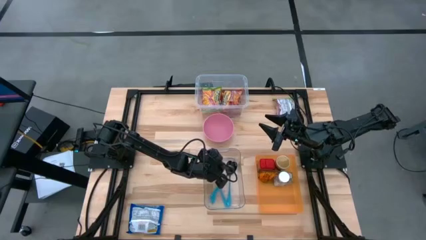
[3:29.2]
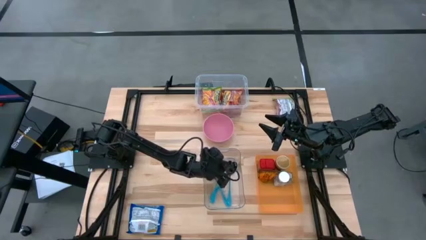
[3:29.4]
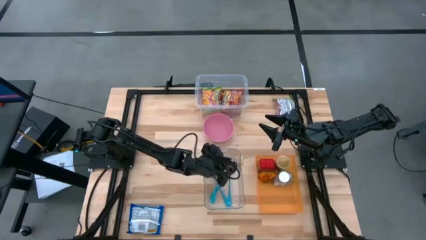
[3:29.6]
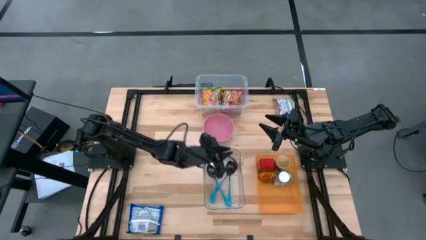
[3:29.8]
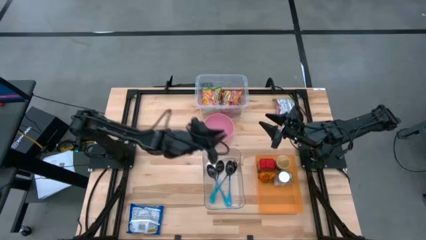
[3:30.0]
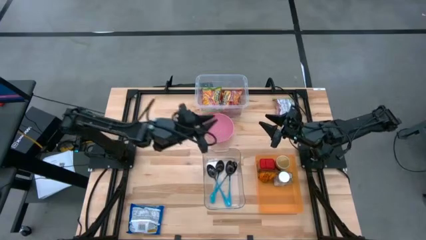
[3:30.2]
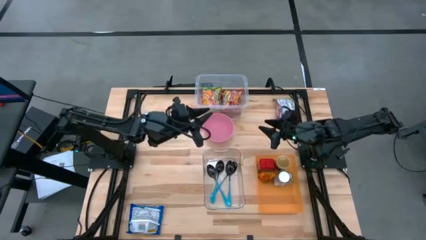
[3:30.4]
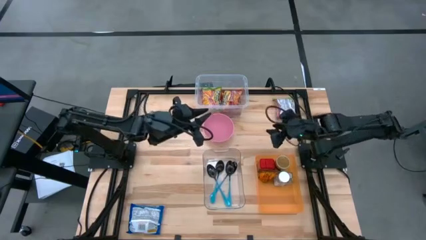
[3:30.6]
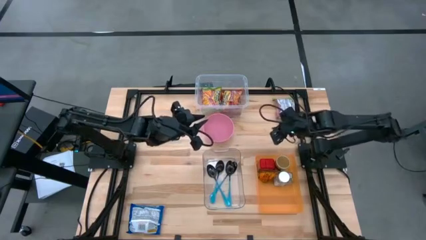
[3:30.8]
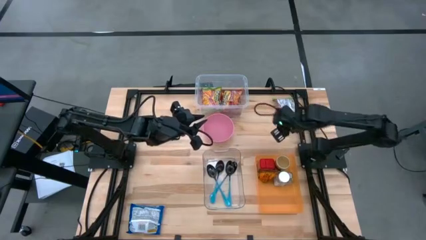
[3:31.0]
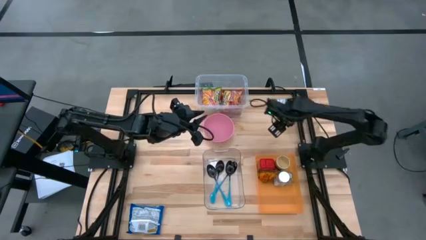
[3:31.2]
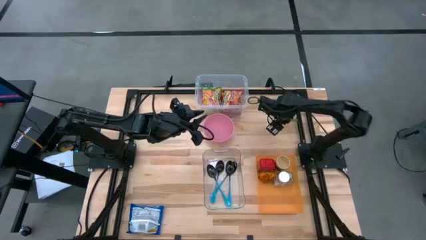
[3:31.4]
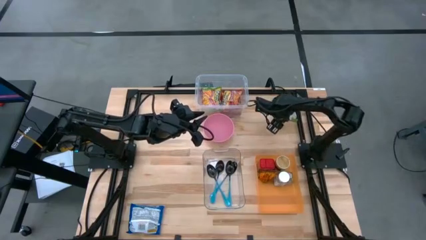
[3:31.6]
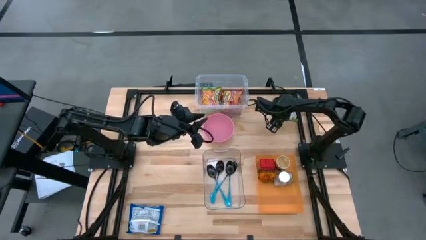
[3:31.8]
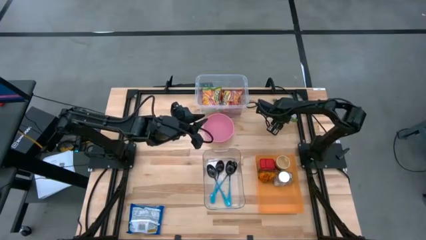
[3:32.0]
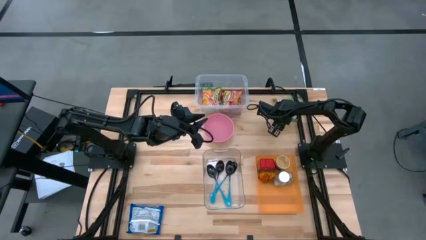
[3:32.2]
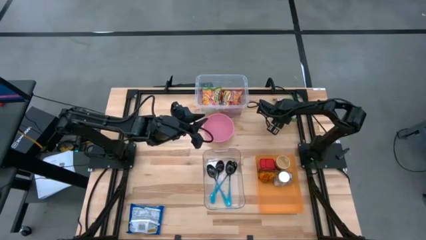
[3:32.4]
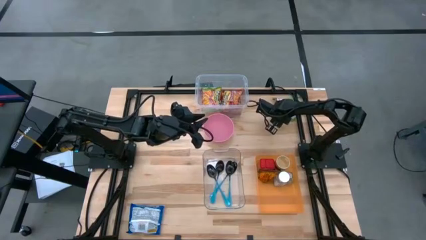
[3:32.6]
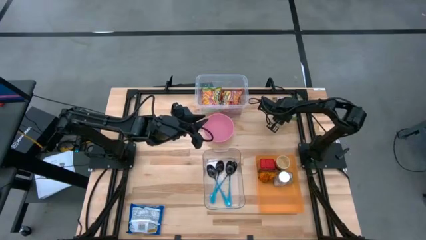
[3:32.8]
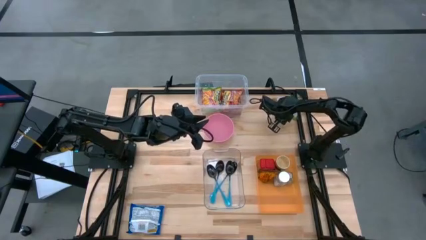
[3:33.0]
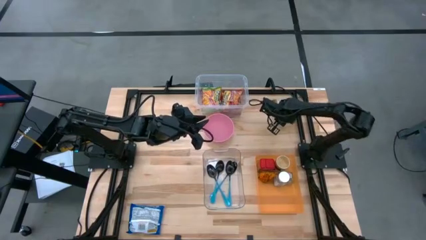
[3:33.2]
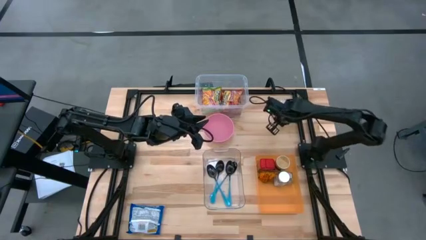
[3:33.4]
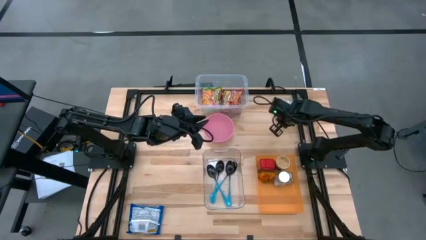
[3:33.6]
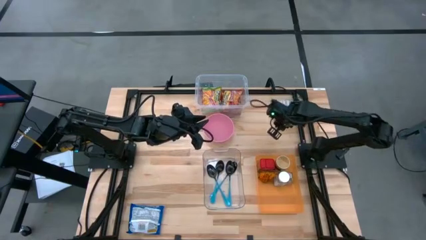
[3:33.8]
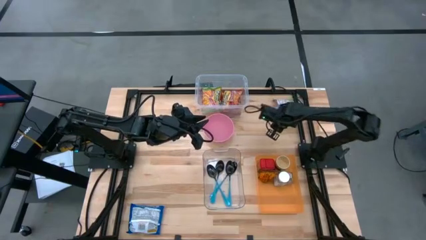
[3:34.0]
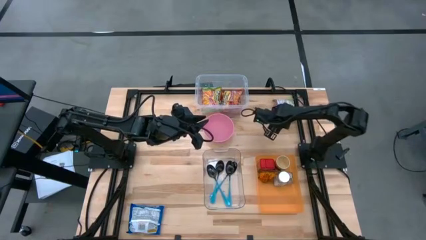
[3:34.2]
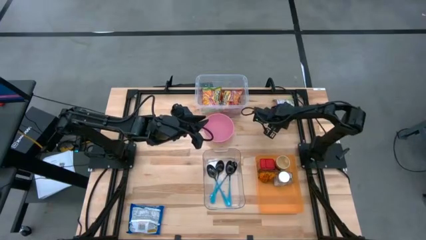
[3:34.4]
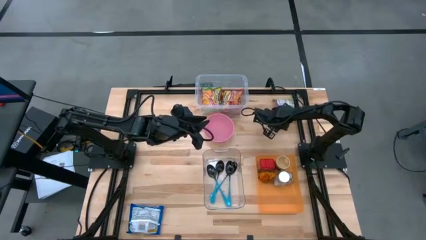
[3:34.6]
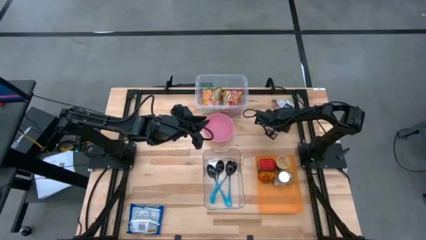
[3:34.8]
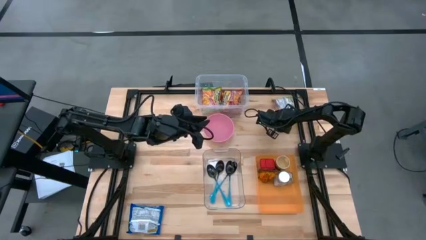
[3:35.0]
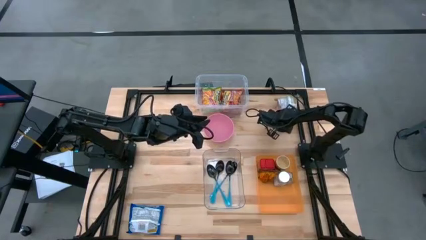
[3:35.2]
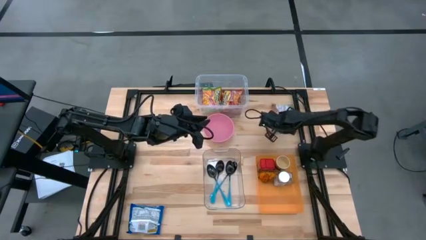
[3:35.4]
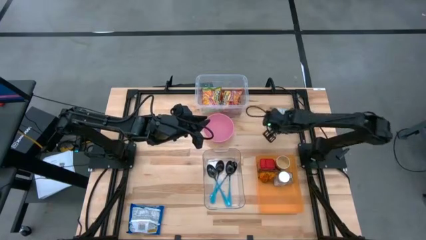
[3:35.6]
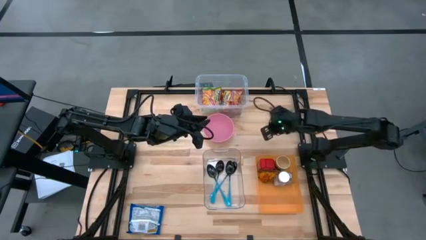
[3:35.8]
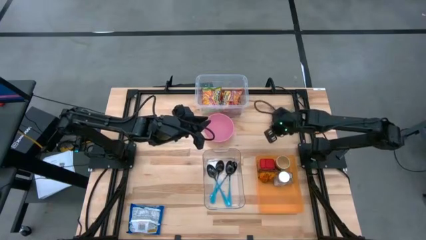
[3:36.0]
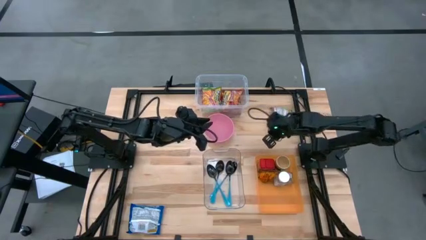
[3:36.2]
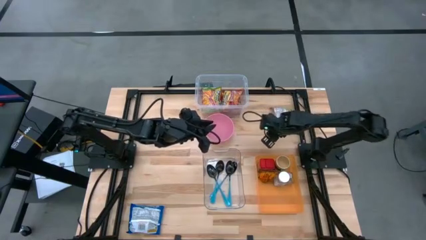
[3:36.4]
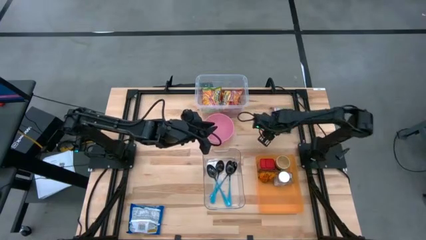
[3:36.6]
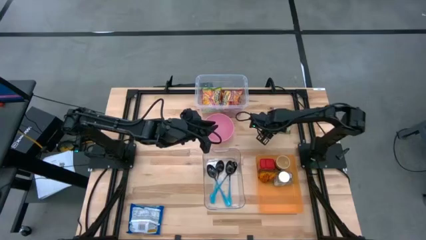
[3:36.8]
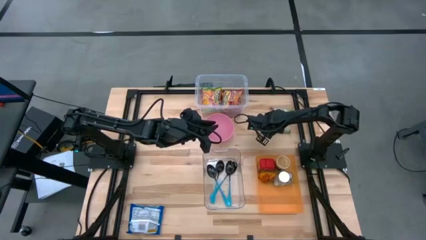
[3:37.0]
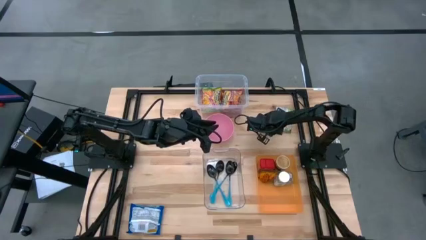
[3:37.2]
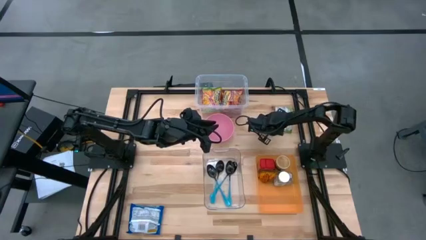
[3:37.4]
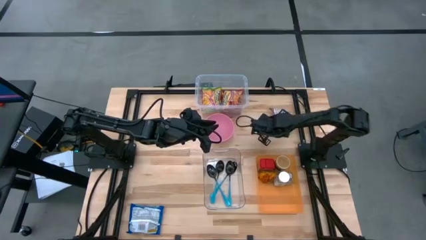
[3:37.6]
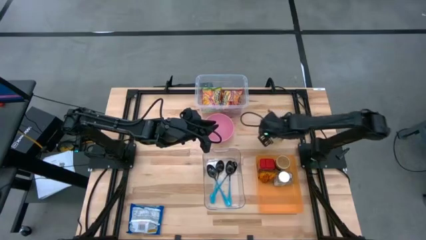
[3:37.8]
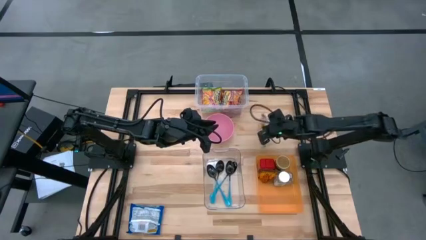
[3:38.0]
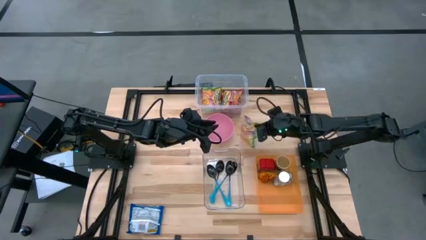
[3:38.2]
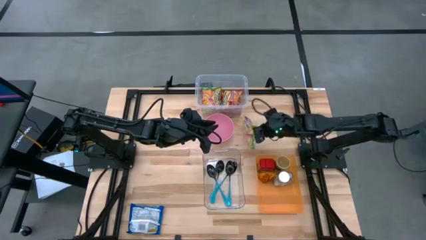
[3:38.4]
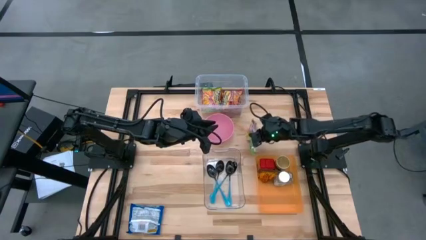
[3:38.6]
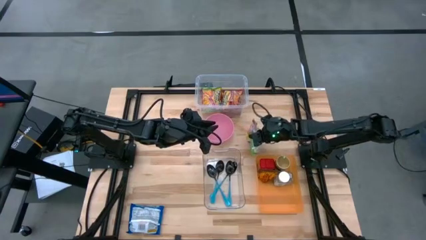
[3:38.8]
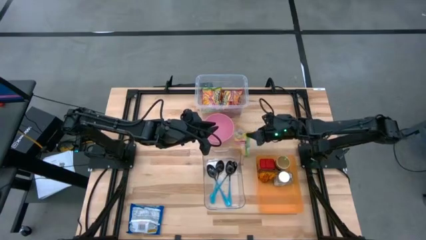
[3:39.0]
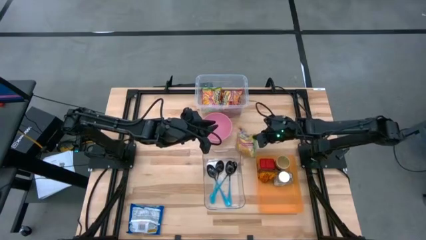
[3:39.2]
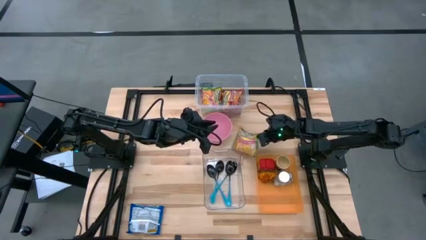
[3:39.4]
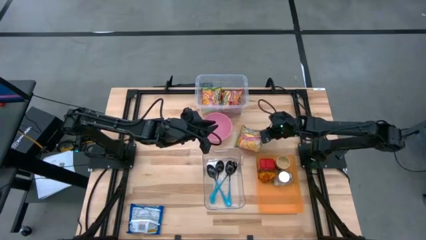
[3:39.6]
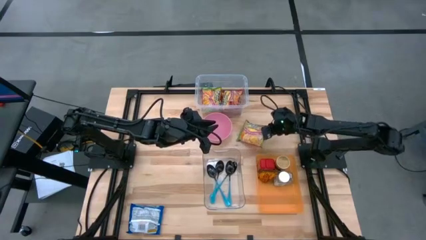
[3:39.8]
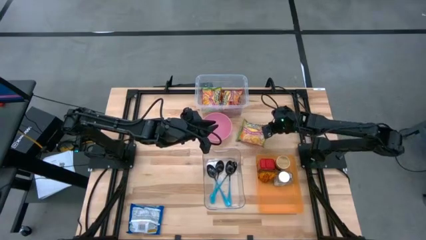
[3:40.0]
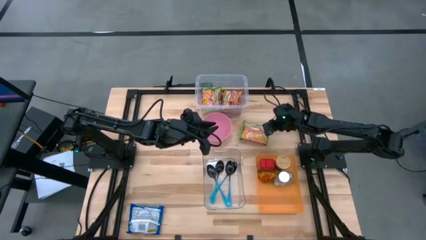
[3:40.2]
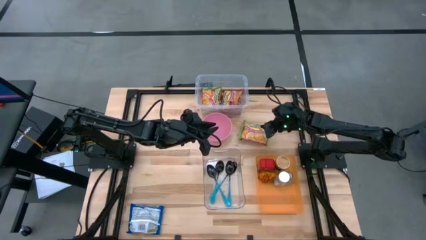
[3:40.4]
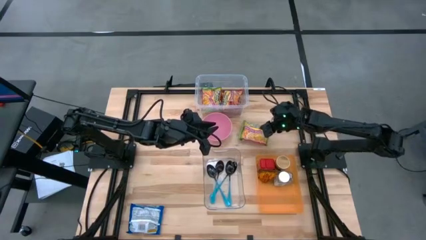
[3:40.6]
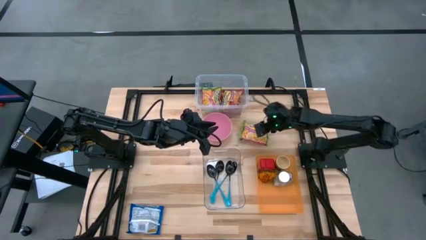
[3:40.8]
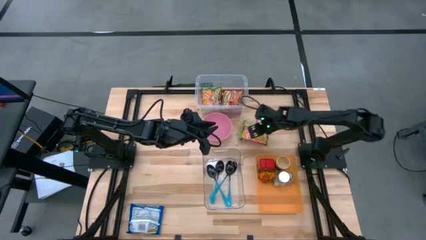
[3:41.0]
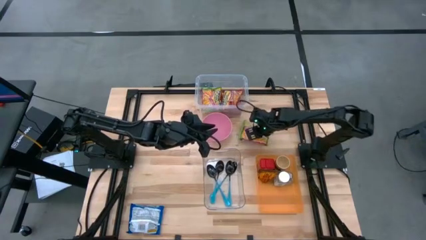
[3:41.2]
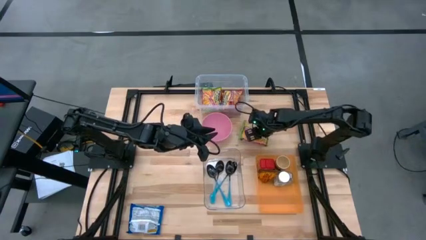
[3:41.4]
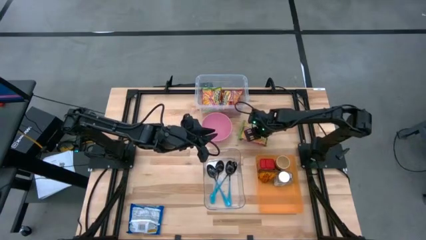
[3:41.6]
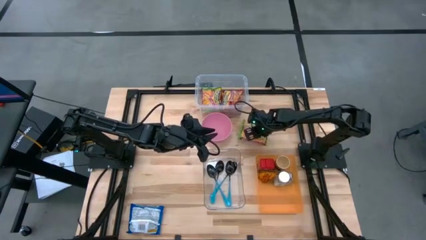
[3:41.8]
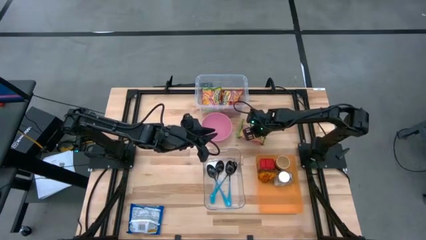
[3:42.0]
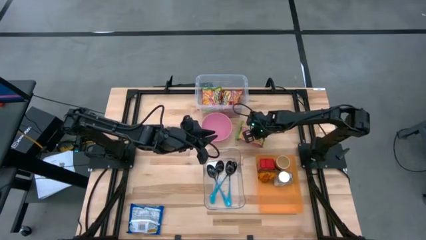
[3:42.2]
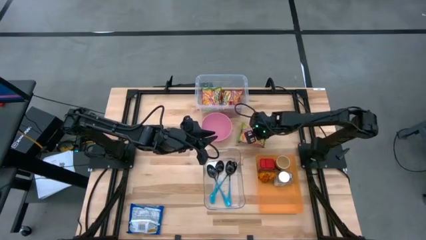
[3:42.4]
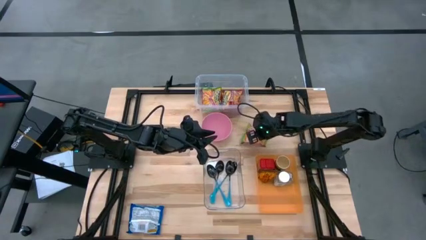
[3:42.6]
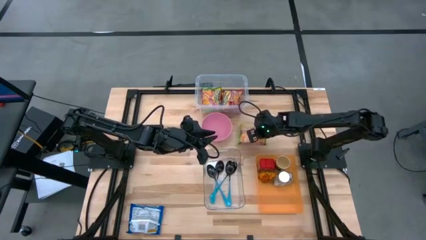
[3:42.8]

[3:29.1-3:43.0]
Task: Pick & Place Food Item
Put the green noodle pack into the top transparent bin

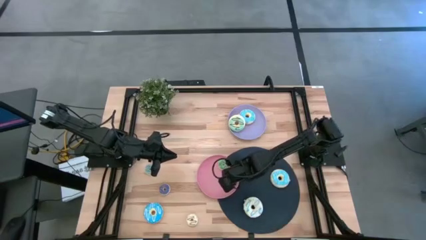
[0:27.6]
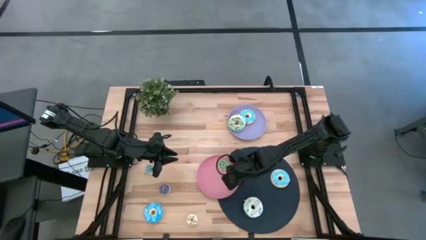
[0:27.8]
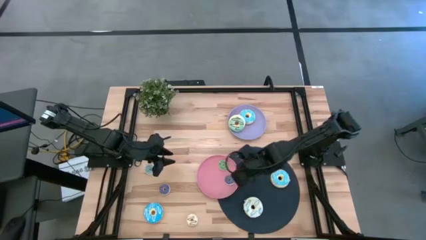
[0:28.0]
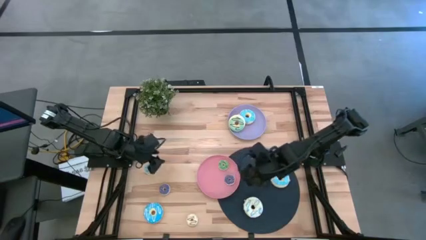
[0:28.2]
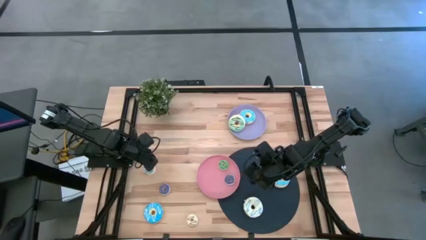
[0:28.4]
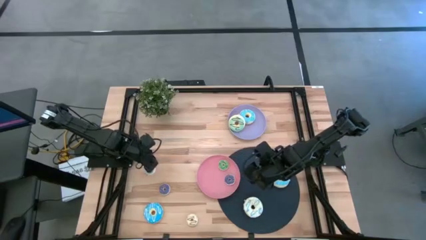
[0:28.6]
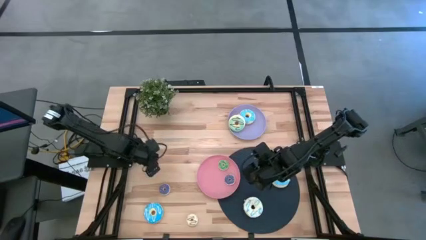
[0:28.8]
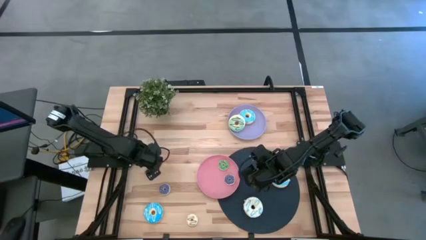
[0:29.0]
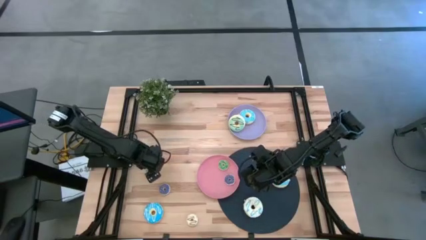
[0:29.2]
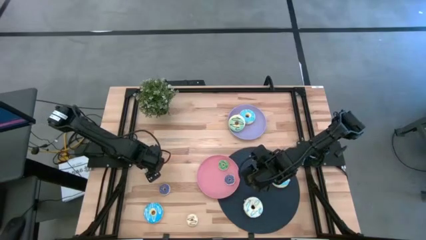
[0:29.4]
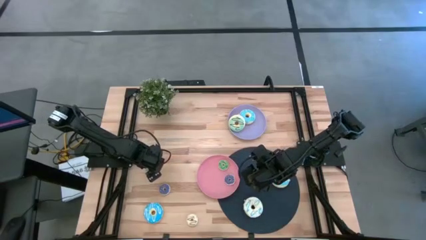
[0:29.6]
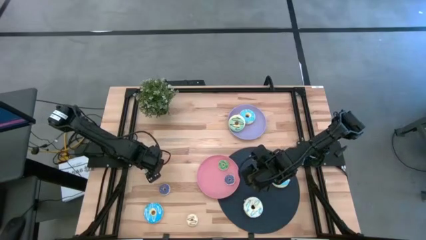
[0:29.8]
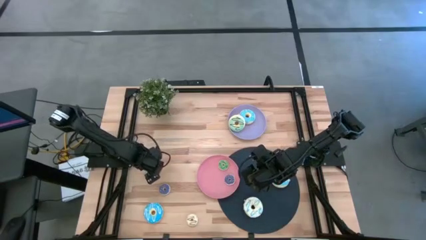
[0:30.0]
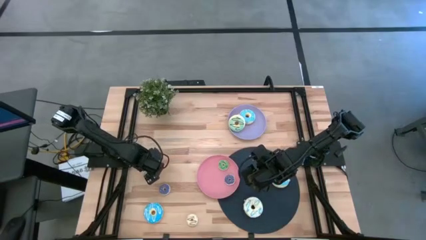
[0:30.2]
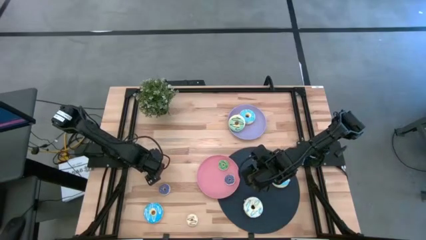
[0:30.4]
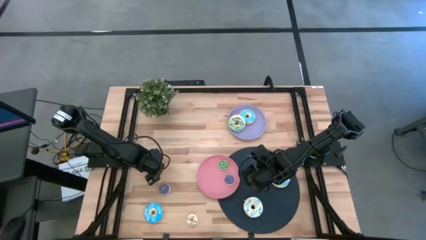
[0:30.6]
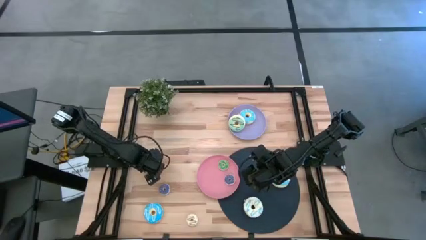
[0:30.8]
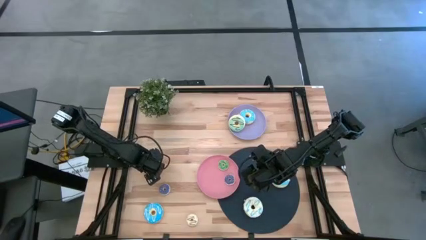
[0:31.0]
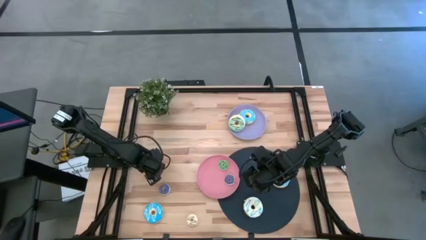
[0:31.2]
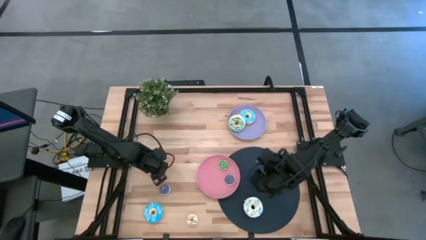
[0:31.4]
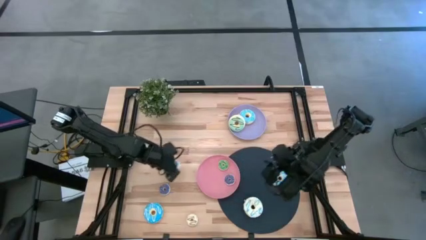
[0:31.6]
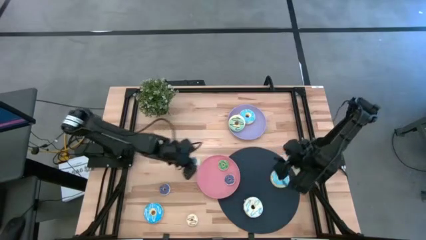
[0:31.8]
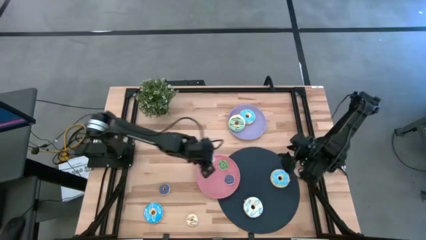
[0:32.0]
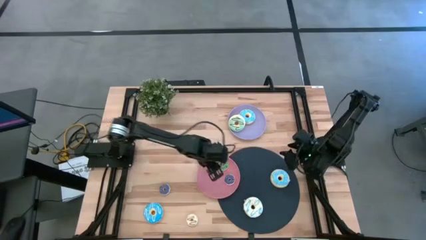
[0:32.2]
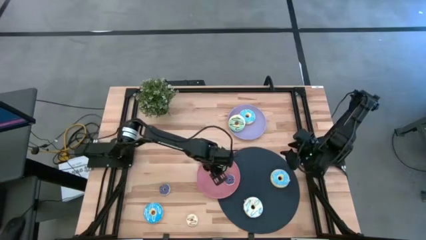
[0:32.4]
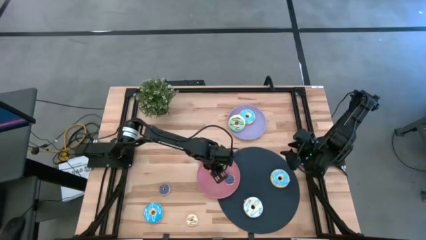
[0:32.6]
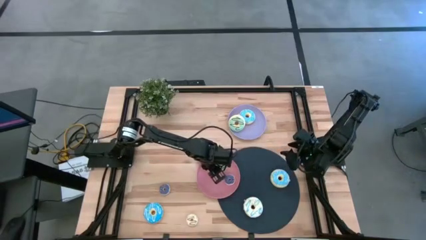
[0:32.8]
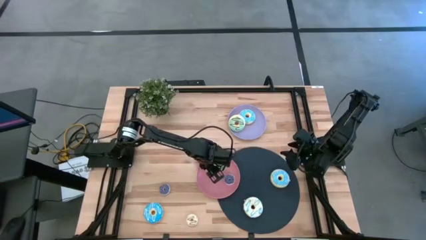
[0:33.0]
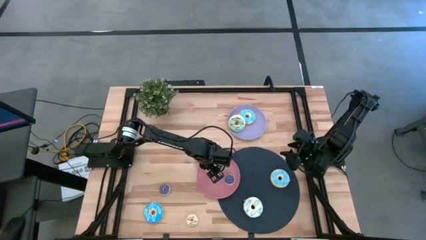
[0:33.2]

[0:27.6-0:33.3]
Task: Pick & Place donuts
Put the small blue donut on the purple plate
